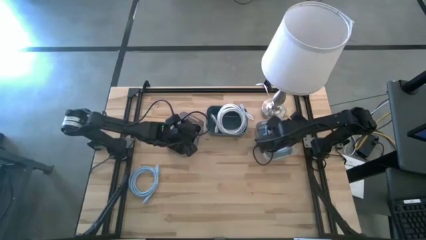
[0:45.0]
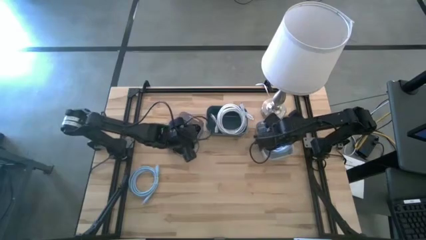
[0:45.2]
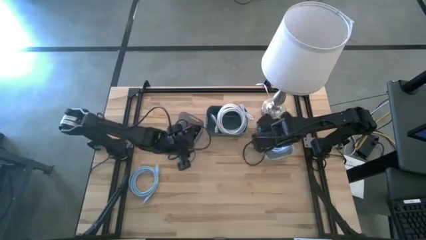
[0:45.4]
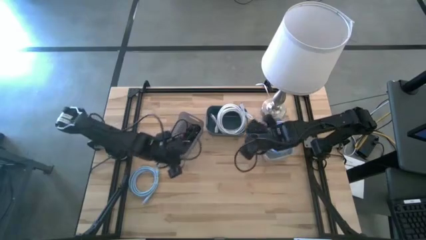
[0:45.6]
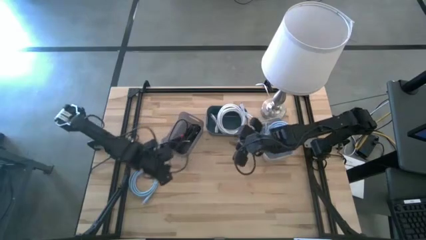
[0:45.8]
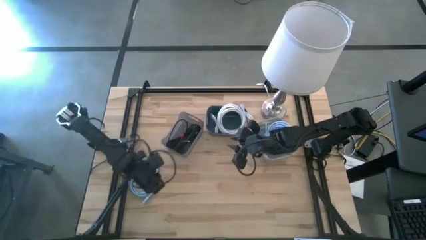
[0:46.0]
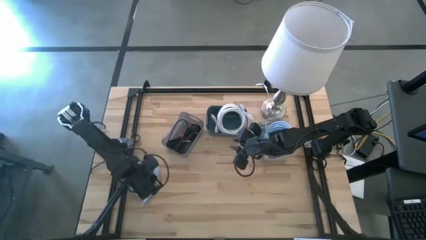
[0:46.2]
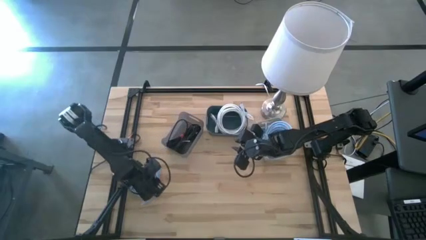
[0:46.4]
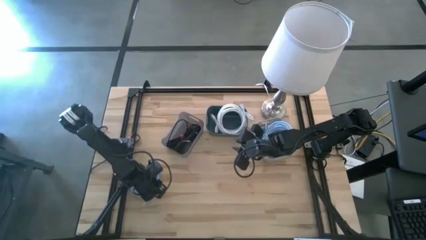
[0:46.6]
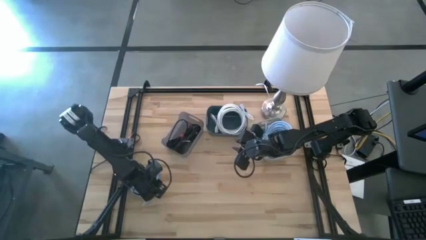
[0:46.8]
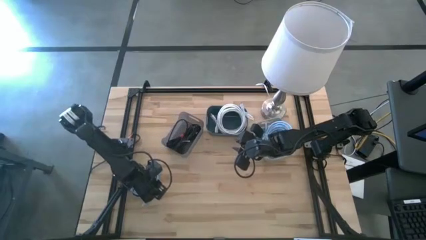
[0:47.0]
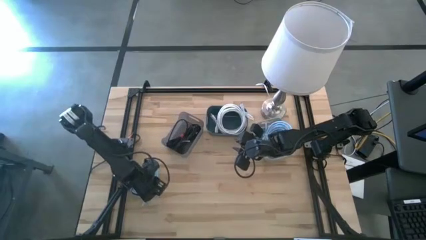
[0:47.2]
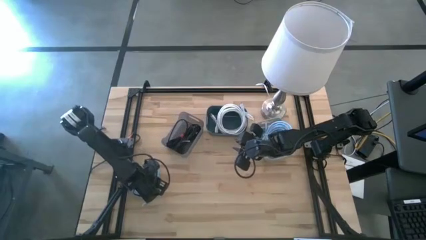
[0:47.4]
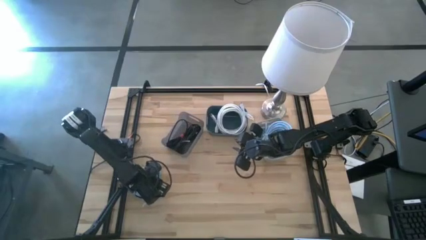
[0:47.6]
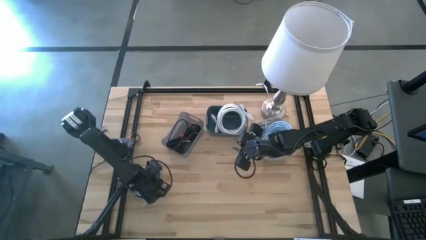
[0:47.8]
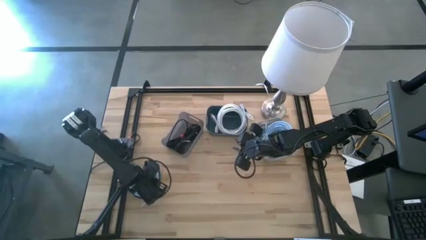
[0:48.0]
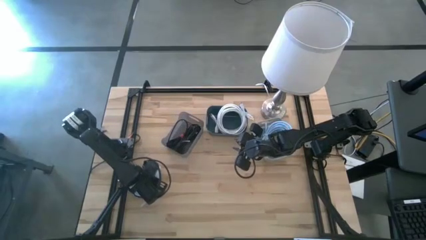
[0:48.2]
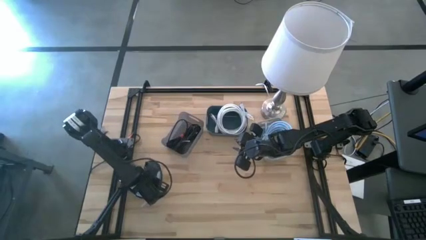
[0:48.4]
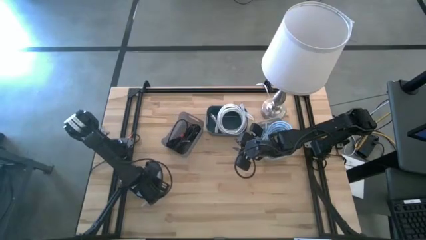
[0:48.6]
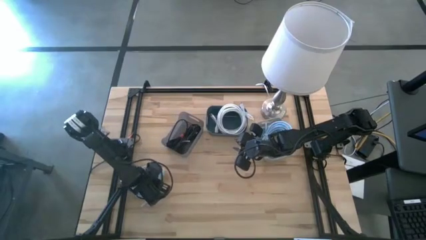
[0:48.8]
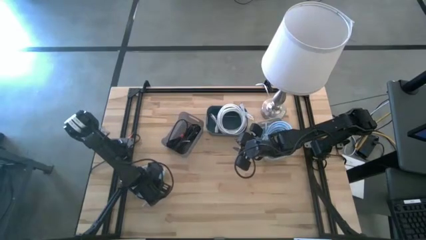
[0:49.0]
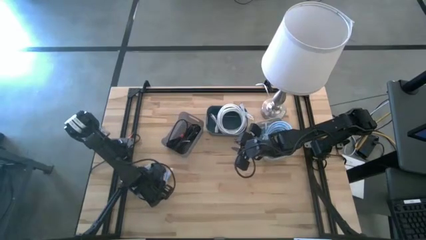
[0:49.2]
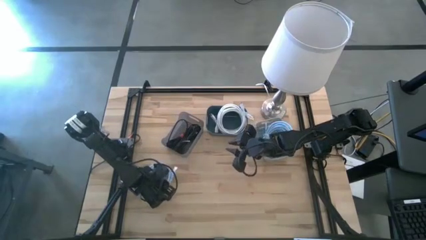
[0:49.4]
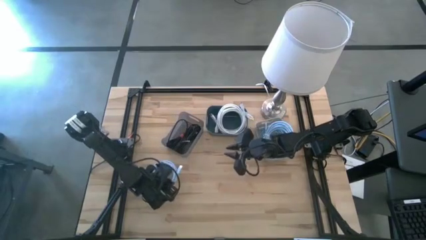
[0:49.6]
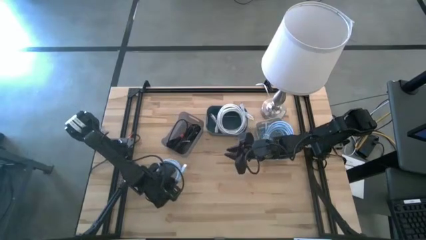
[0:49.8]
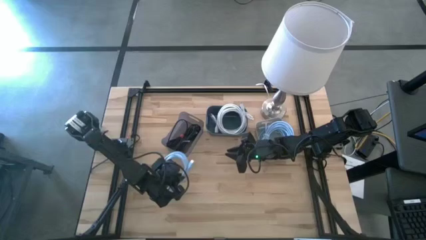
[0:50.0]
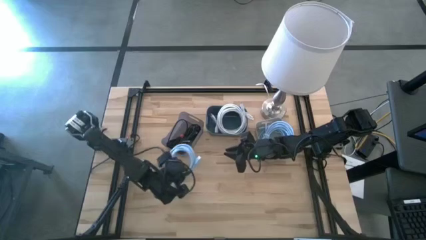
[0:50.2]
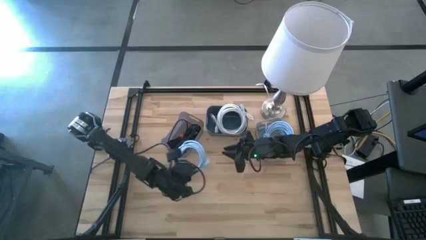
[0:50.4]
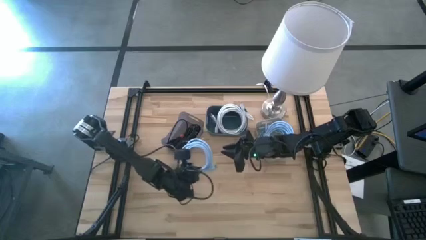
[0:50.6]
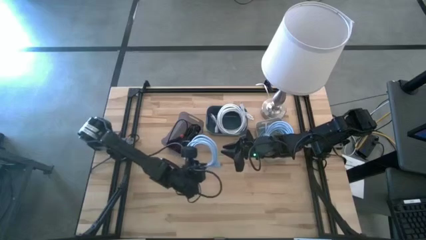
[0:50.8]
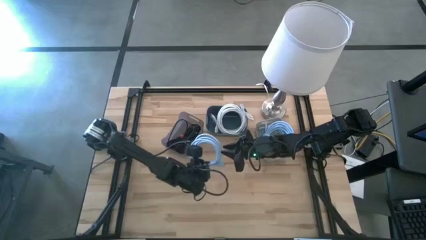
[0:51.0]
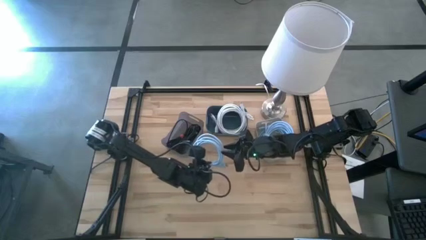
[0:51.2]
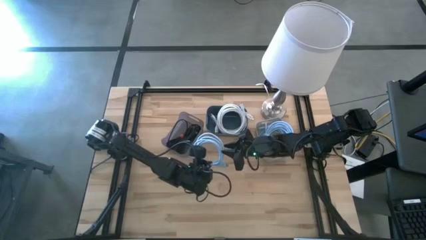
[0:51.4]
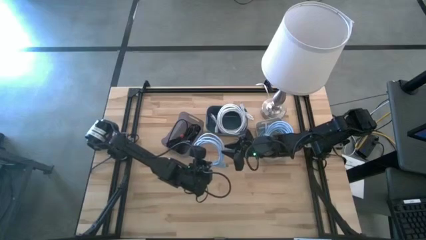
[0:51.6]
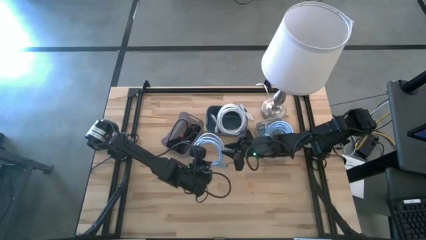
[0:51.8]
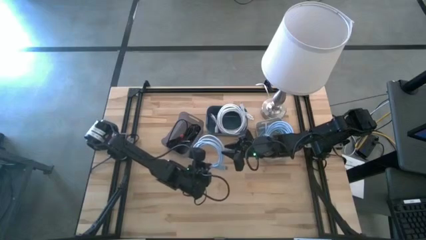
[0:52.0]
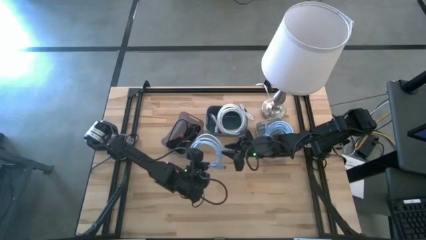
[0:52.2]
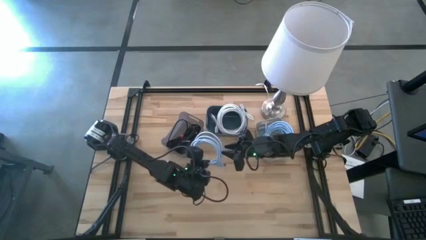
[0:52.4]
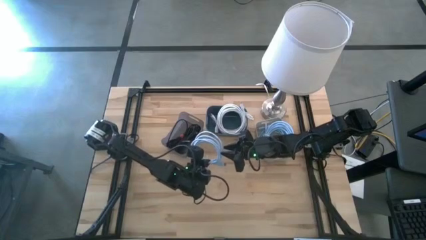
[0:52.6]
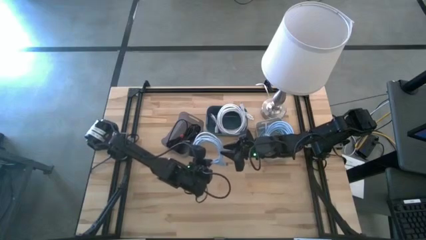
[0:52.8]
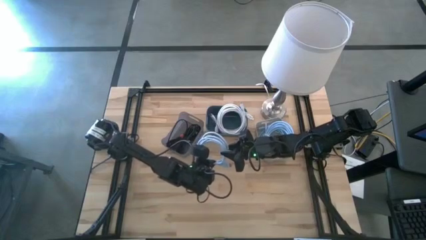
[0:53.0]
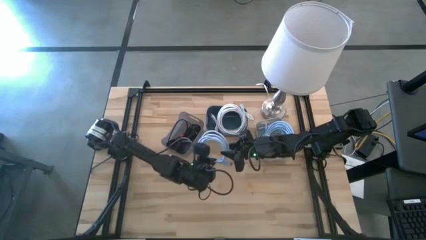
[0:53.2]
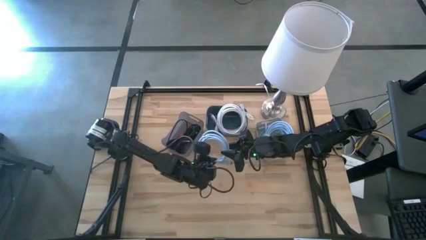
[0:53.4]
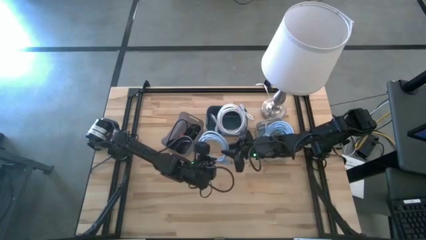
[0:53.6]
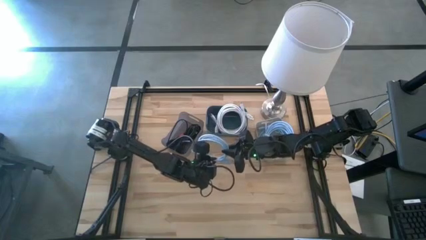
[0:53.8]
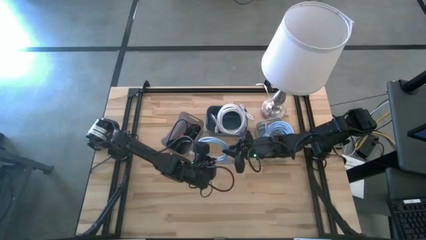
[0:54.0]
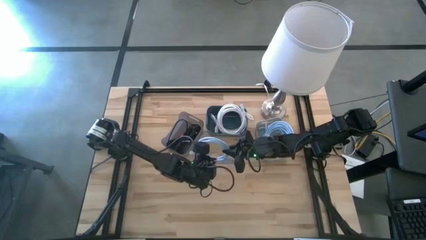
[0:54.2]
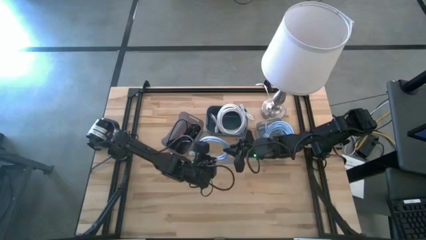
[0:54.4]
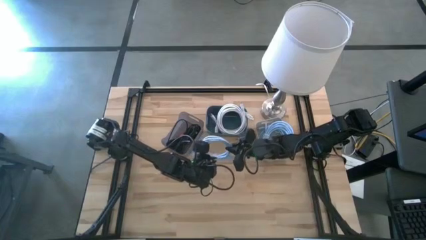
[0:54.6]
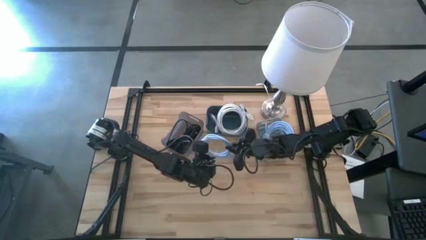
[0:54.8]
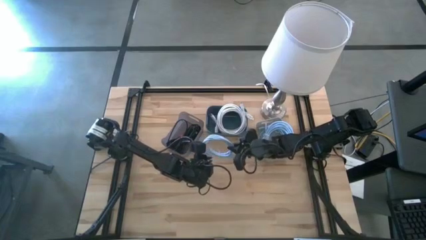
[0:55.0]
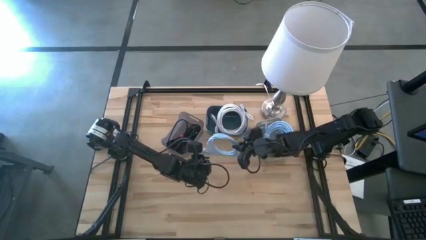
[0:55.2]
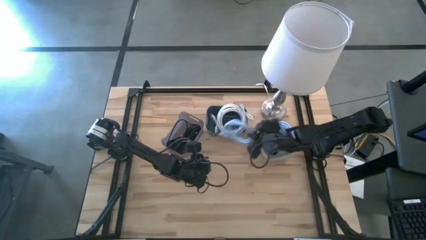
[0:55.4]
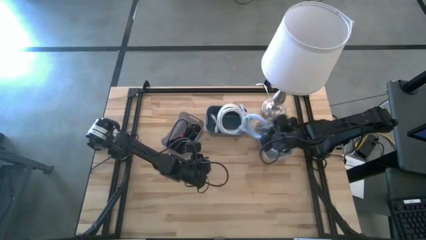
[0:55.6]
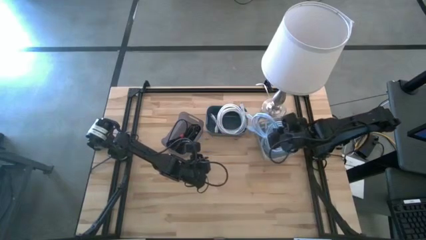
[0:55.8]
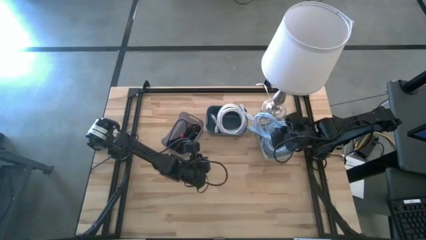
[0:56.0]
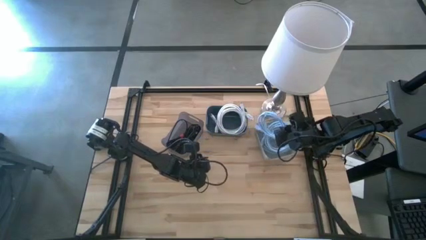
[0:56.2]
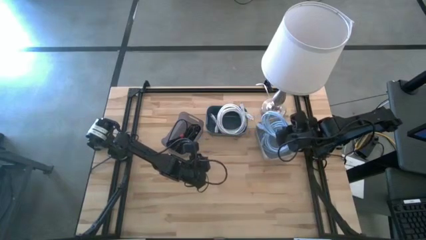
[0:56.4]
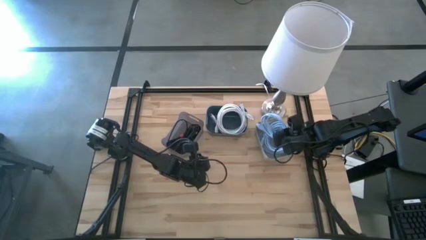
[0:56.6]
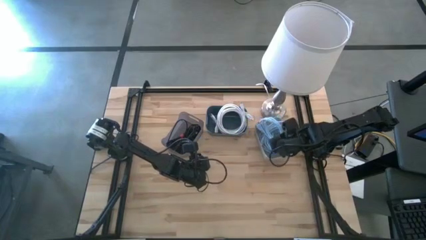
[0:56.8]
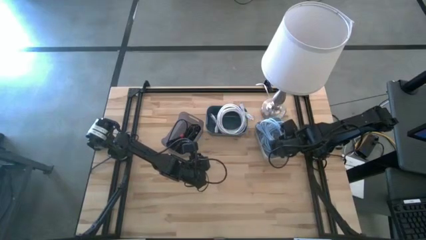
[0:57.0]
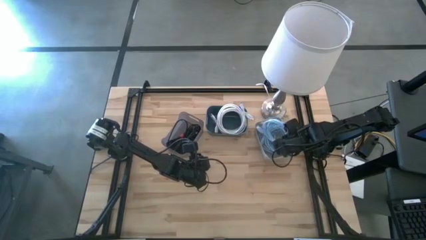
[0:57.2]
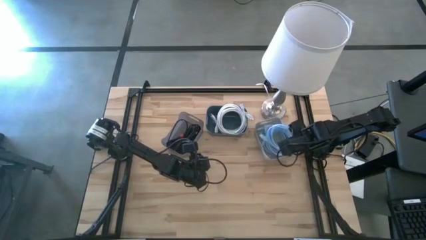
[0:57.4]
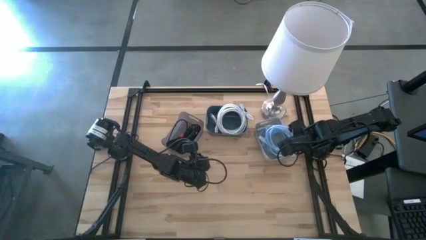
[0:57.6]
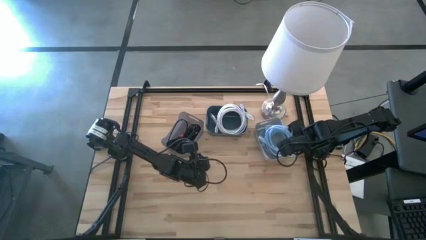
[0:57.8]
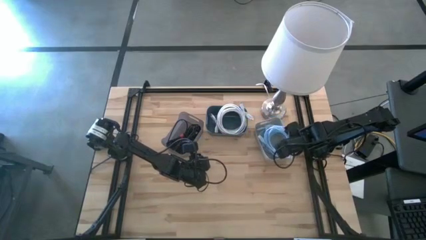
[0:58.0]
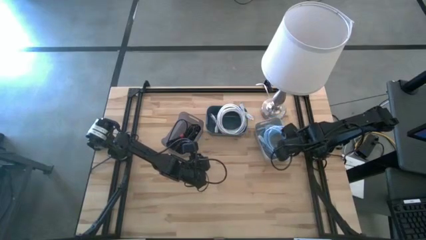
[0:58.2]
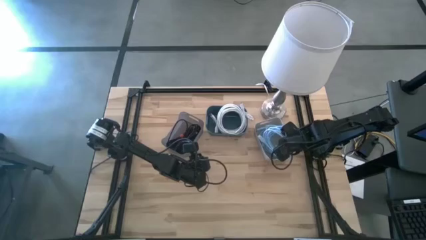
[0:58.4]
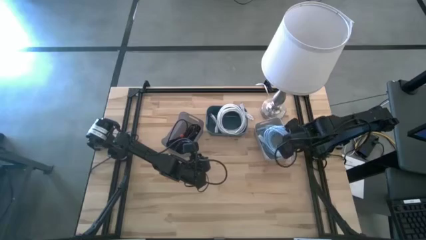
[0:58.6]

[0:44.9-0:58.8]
Task: Sort HDMI cables
Put the blue HDMI cable into the white bin
